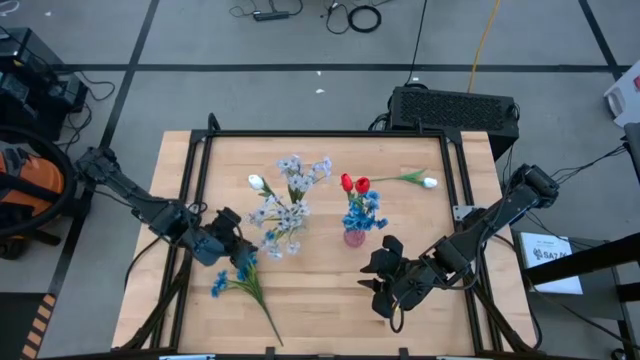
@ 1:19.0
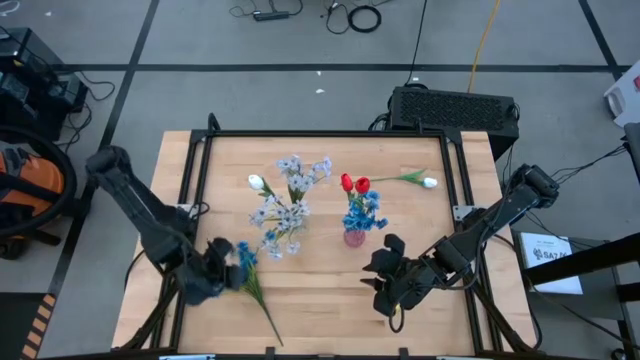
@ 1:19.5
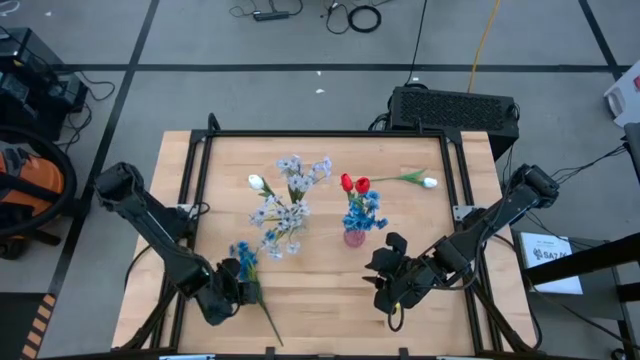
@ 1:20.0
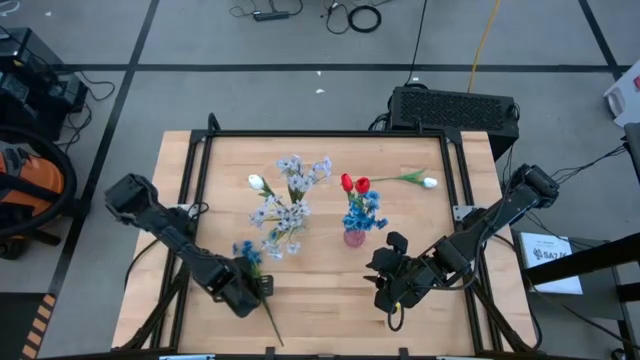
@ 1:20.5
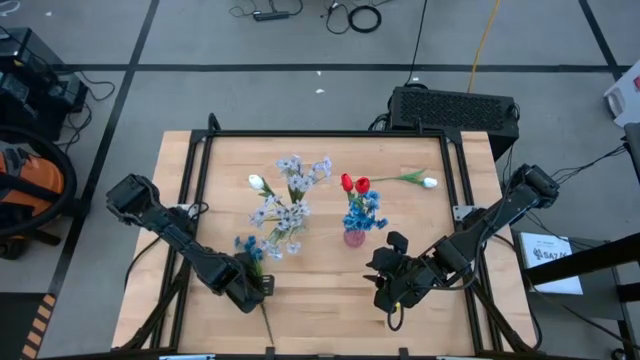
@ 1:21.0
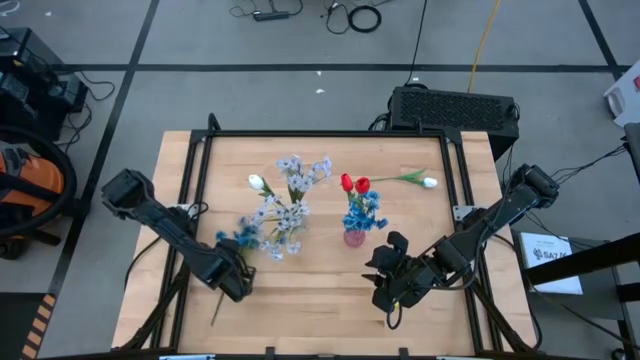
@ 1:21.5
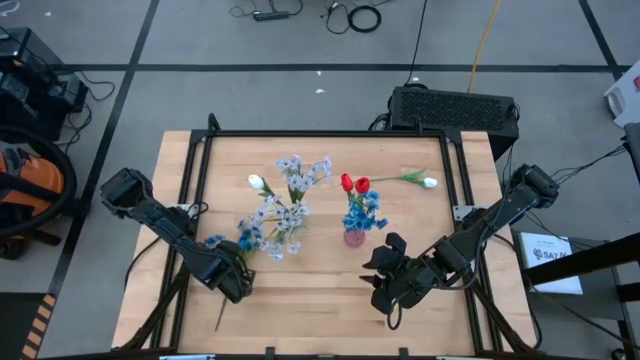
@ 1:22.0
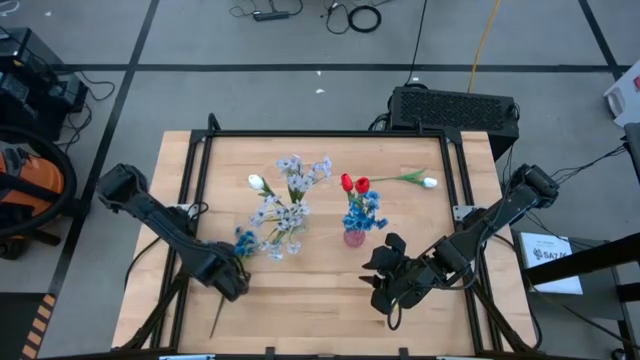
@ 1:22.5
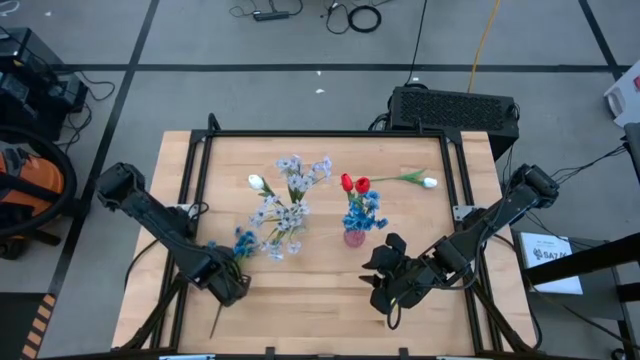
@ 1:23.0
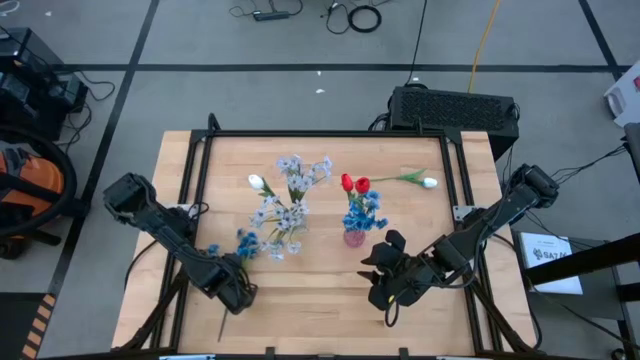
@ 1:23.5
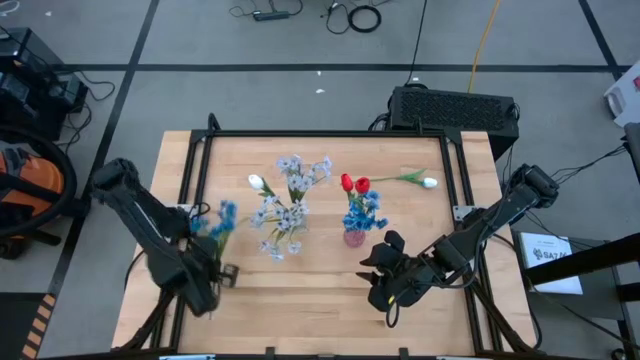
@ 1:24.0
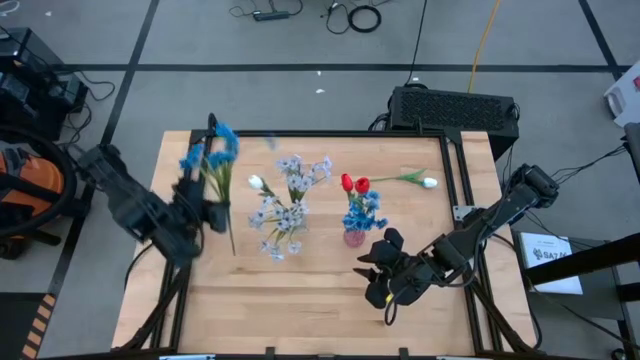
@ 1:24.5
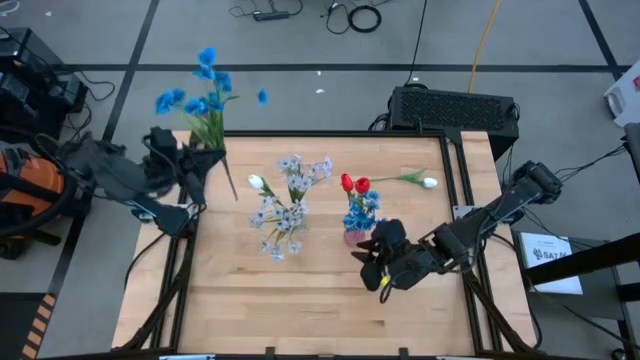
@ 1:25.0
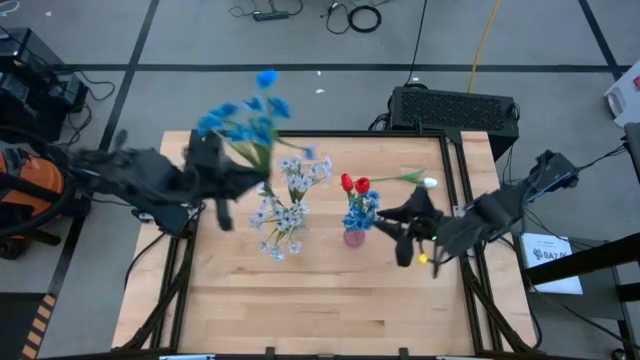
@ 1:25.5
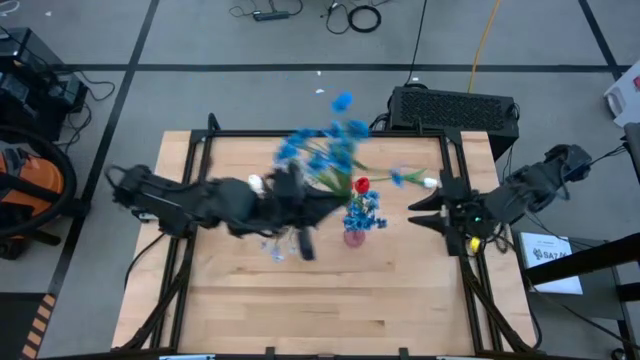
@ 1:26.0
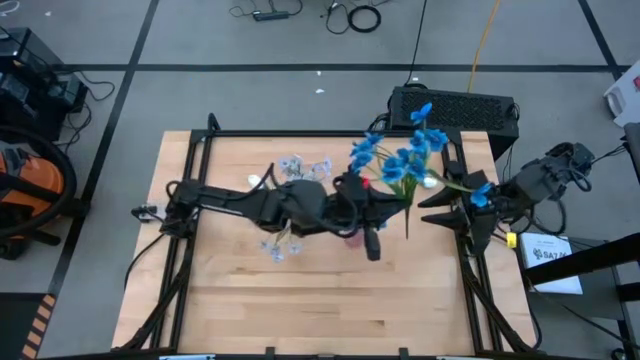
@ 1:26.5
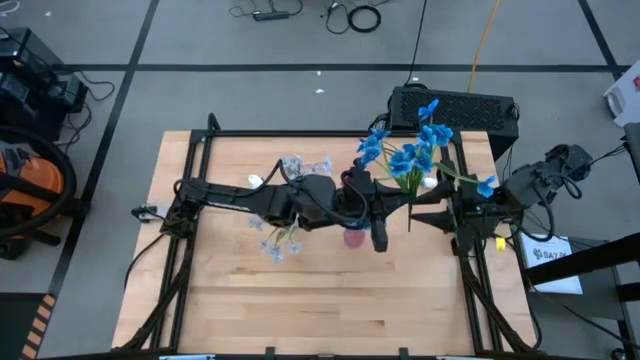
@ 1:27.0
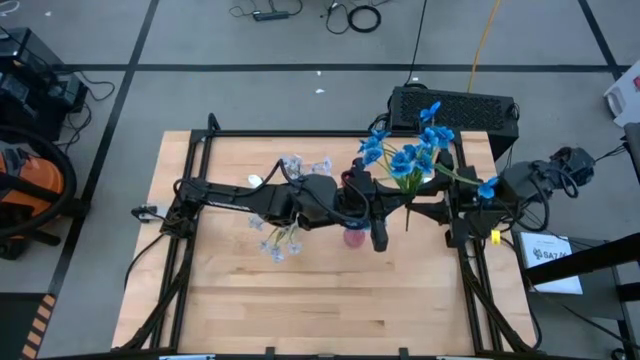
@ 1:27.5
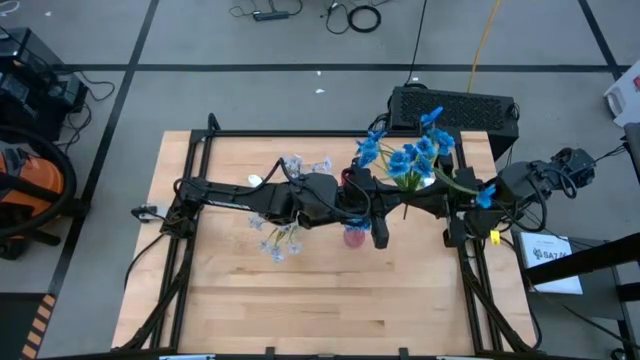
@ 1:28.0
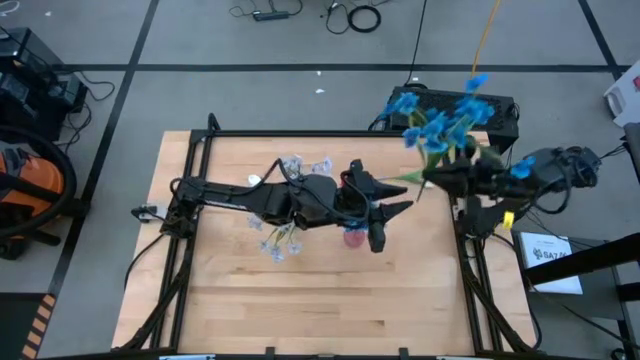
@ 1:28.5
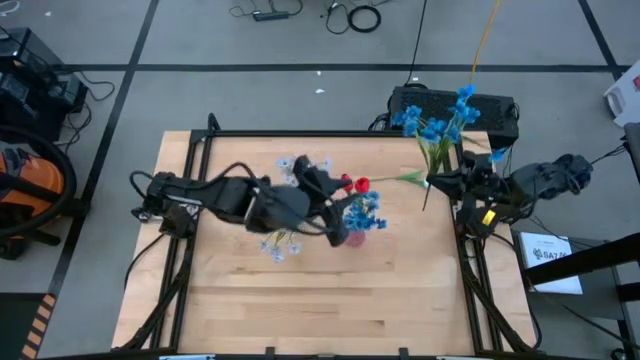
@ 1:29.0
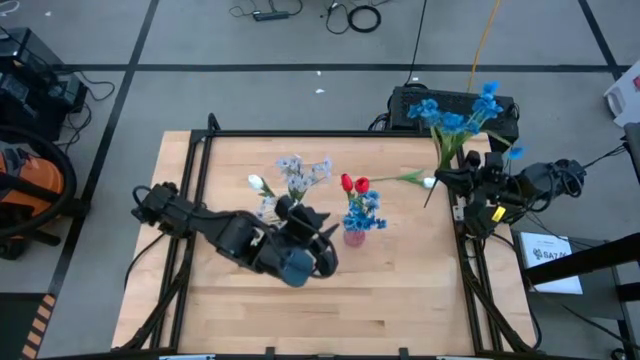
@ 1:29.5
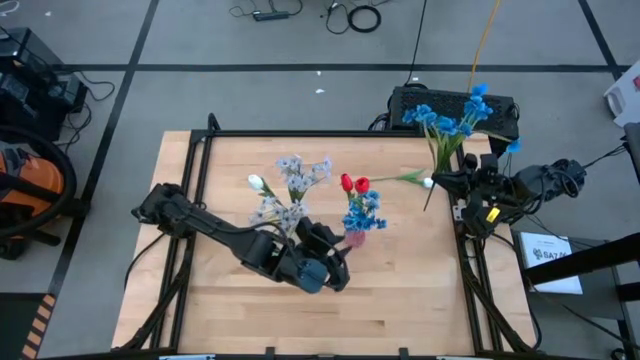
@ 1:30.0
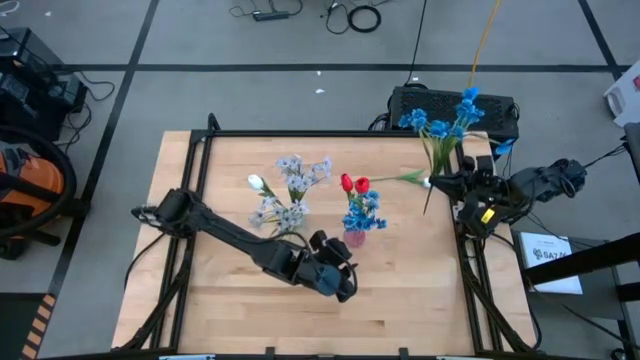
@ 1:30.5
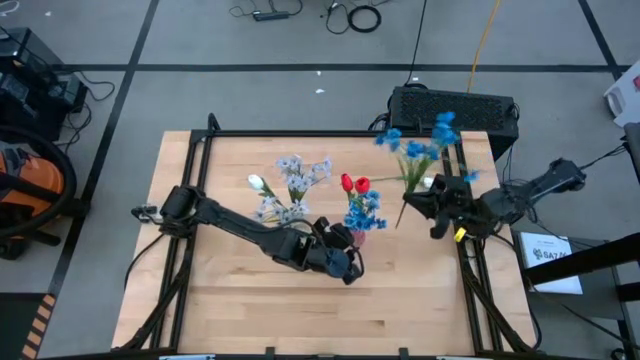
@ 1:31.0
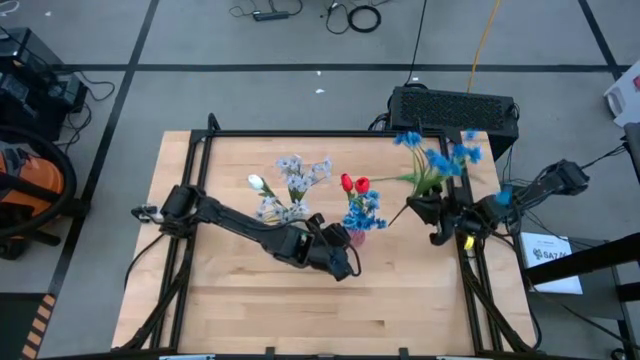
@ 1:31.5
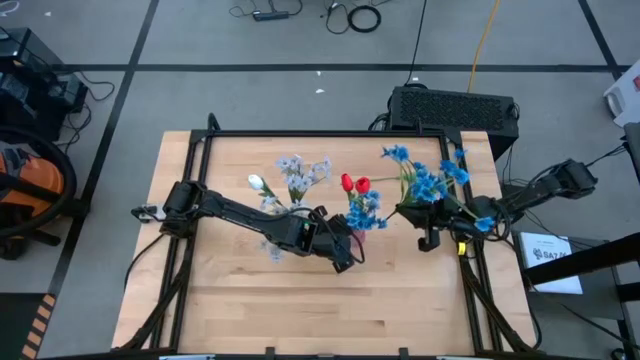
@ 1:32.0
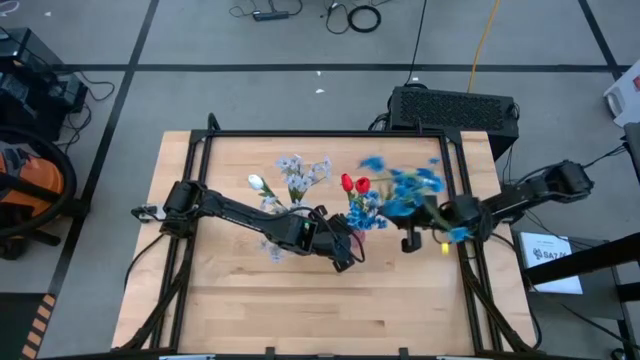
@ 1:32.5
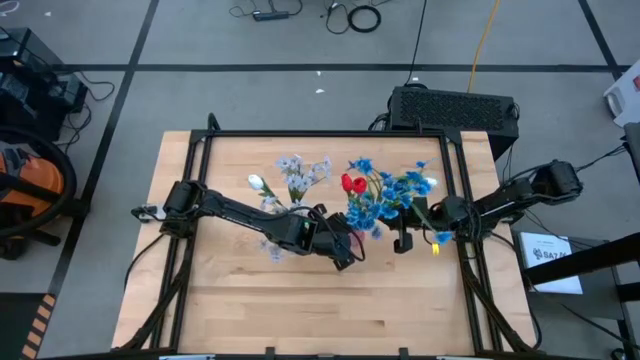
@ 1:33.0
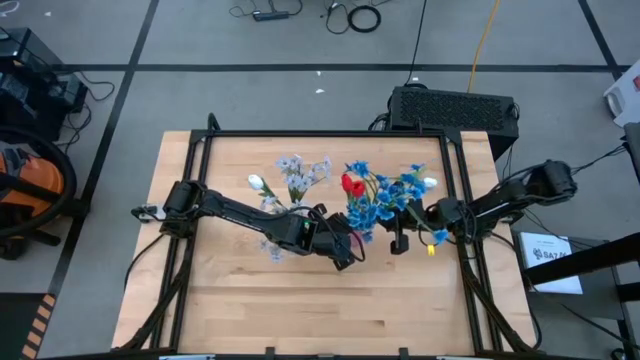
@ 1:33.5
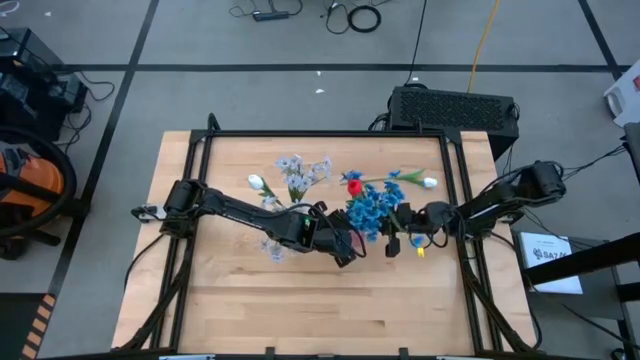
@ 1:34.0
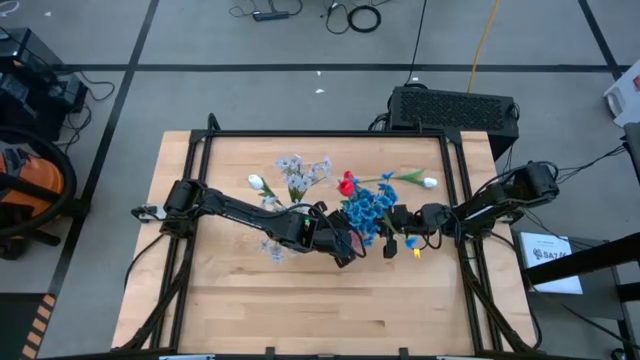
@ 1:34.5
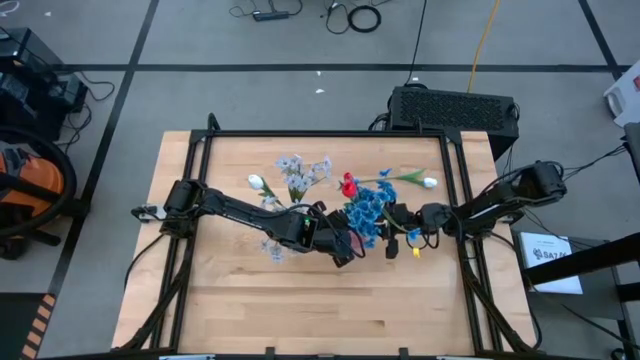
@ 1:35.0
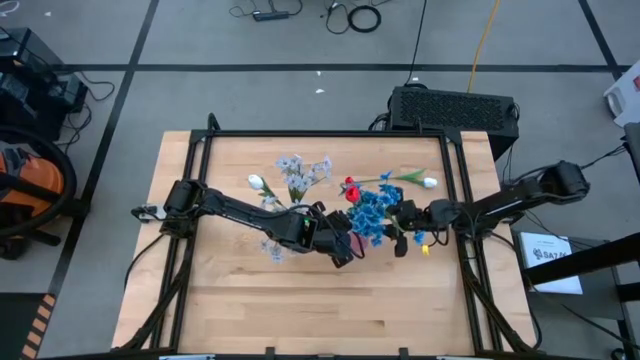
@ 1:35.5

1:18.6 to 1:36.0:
Task: Sort flowers into vase by color
Put the blue flowers into the pink vase

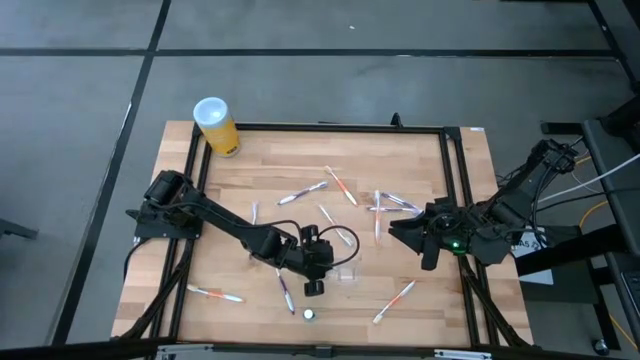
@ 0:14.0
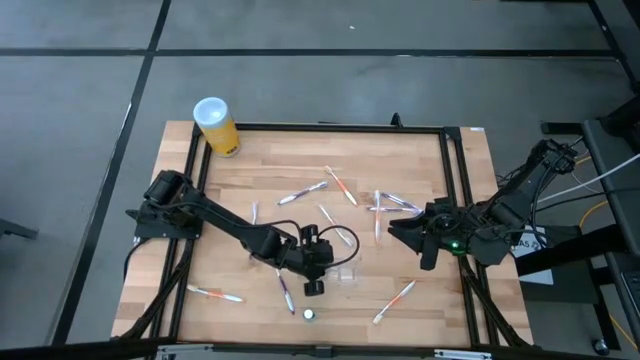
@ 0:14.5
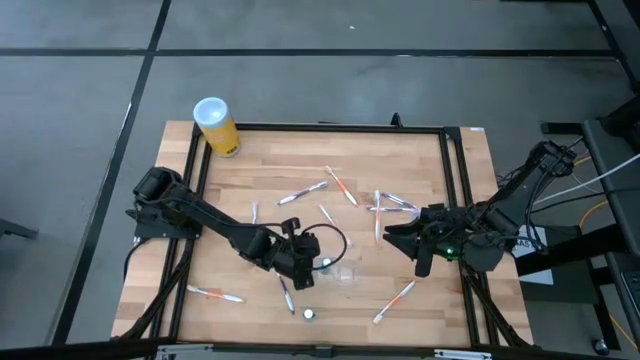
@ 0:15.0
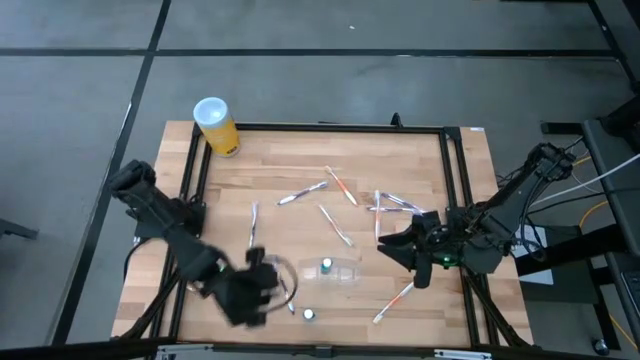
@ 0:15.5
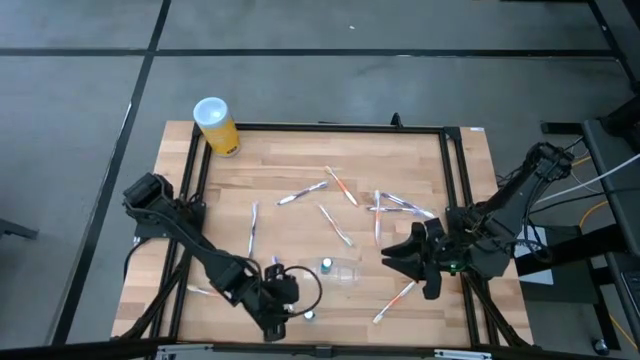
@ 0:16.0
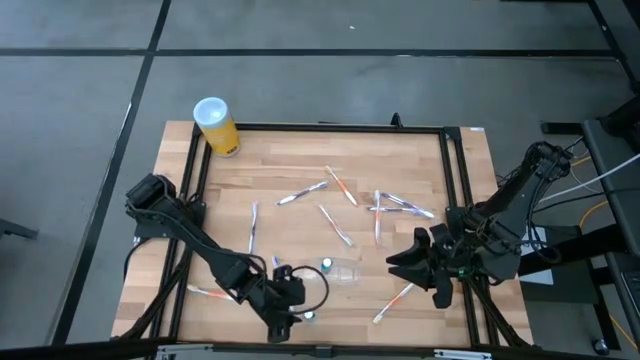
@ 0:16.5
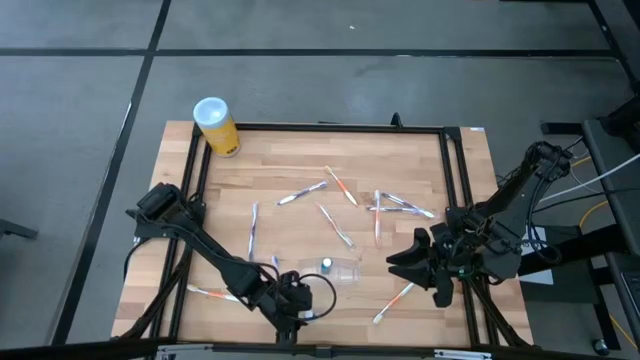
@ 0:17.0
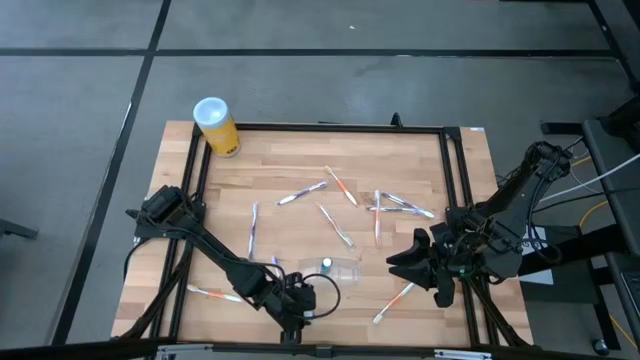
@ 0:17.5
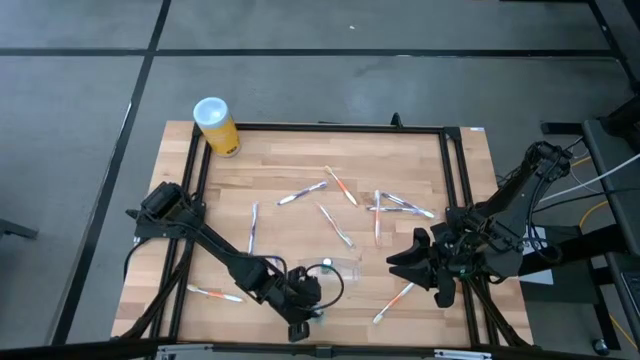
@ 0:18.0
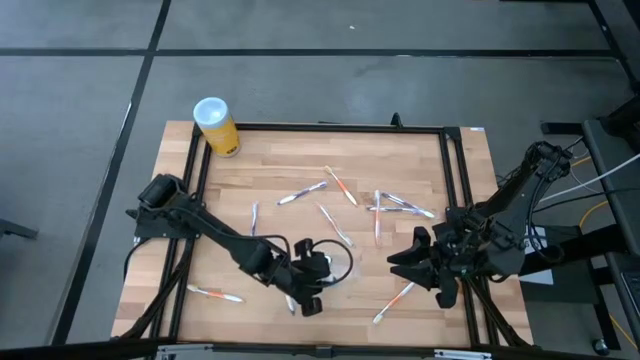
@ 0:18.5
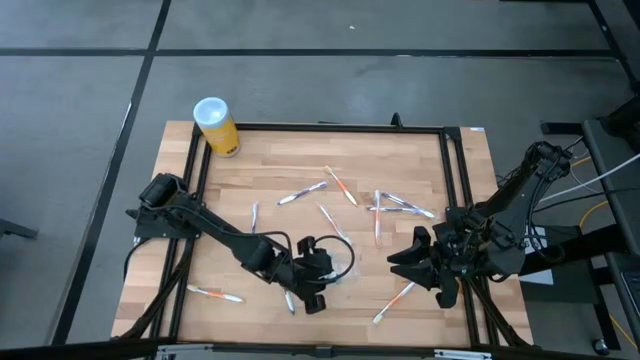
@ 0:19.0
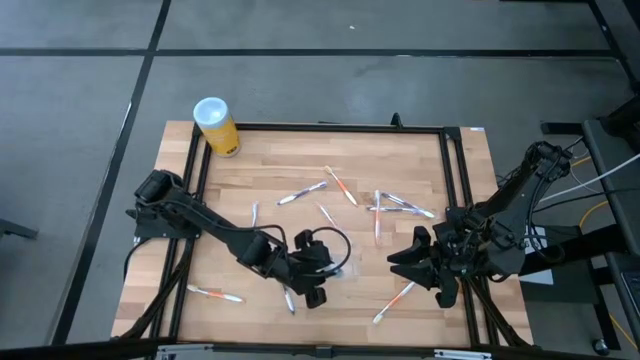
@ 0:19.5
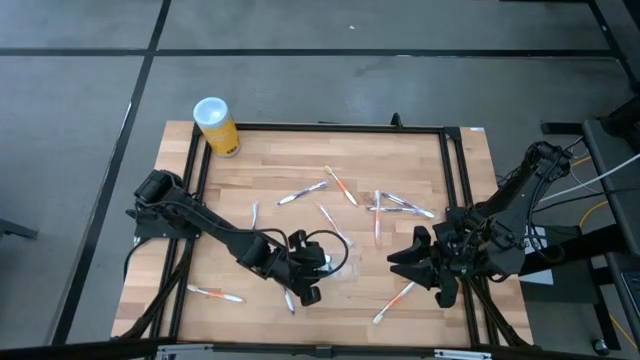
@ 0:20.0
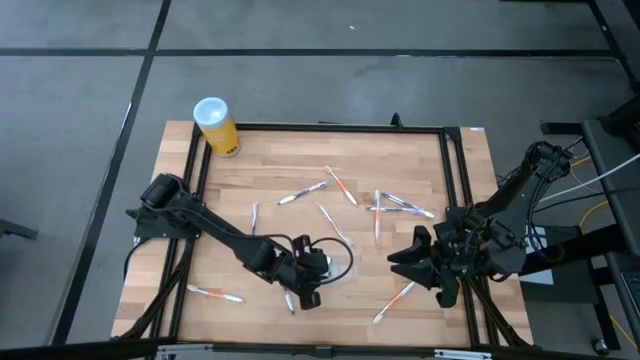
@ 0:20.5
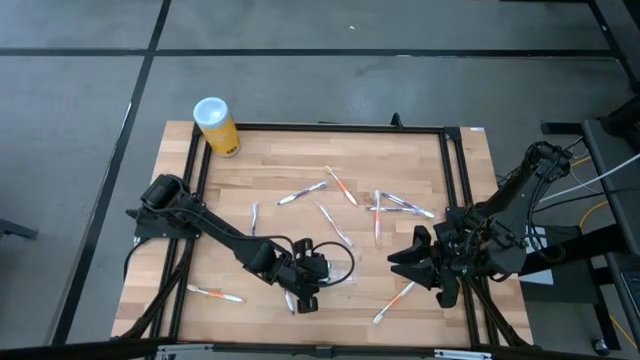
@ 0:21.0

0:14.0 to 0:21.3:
Task: Pick & Place toothbrushing station
Put the blue mouthwash into the middle section of the transparent organizer
